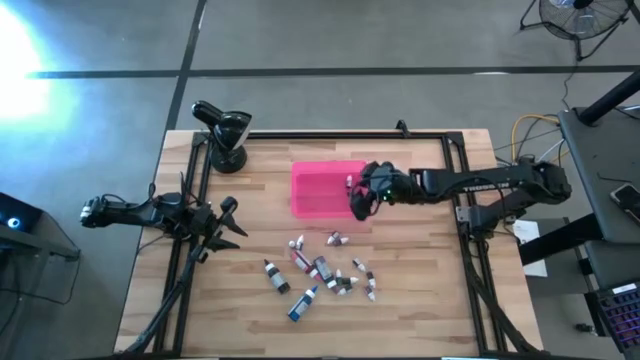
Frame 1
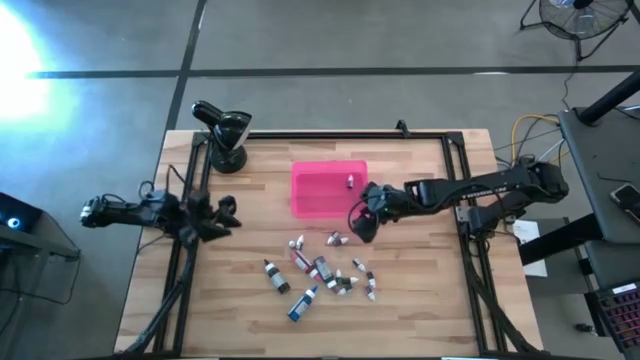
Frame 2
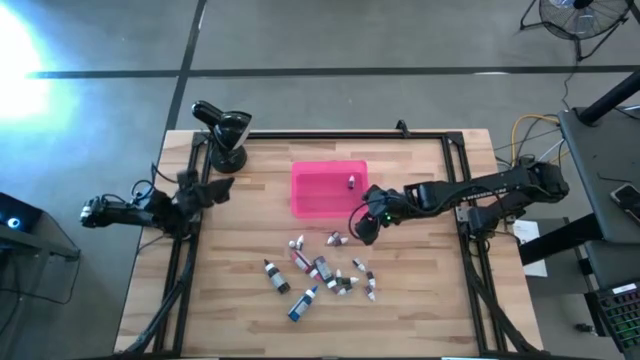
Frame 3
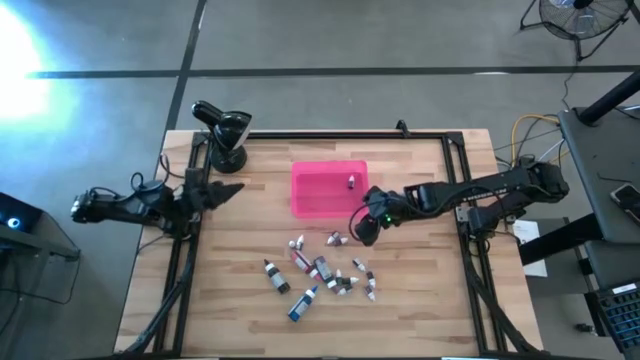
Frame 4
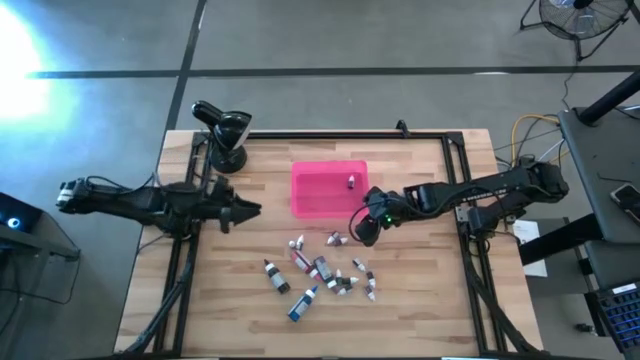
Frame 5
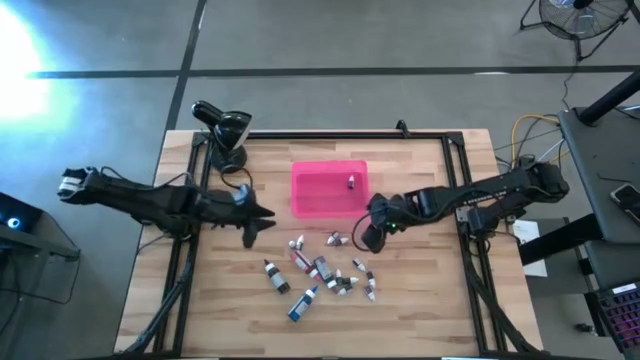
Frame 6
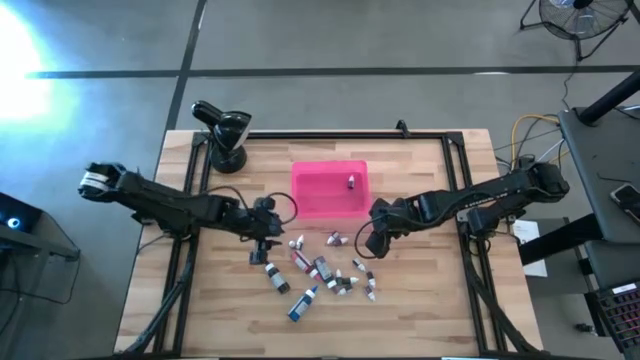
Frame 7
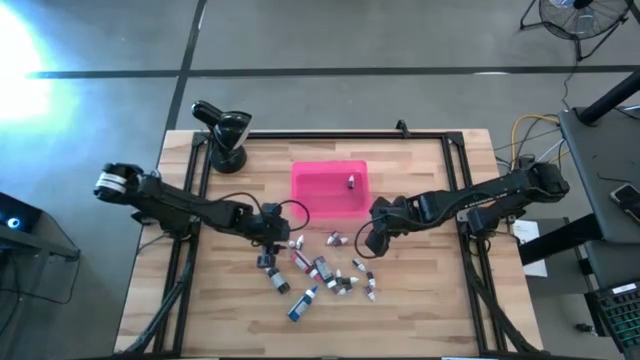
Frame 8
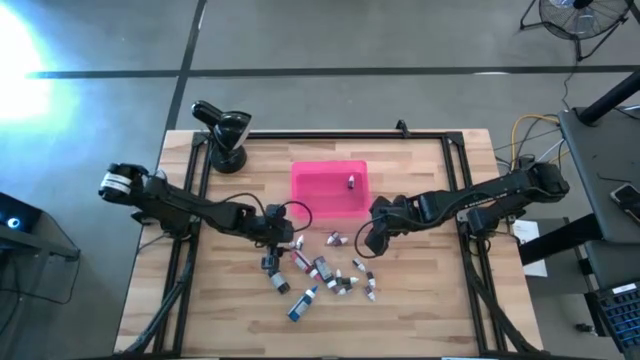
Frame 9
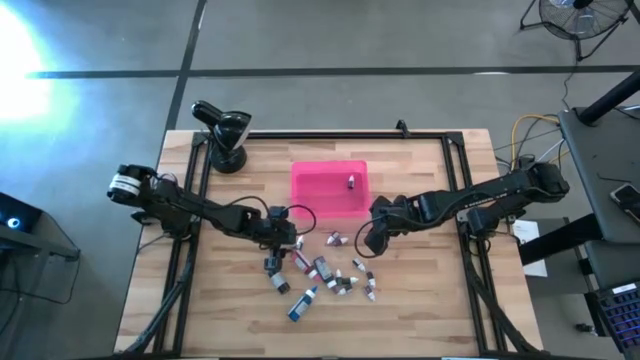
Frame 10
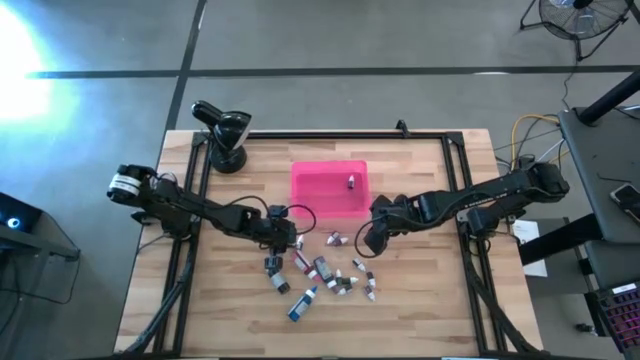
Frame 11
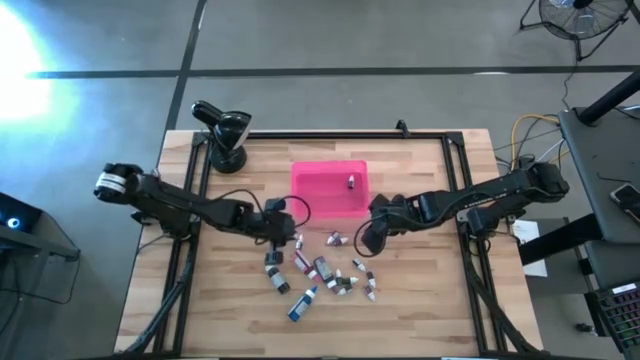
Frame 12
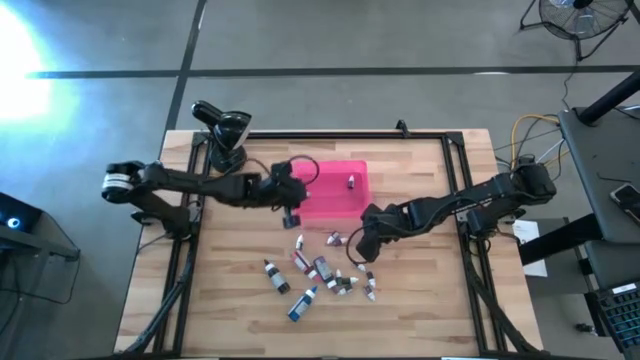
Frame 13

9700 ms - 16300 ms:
Task: Pick & Place food coloring
Put the red food coloring bottle into the pink bin

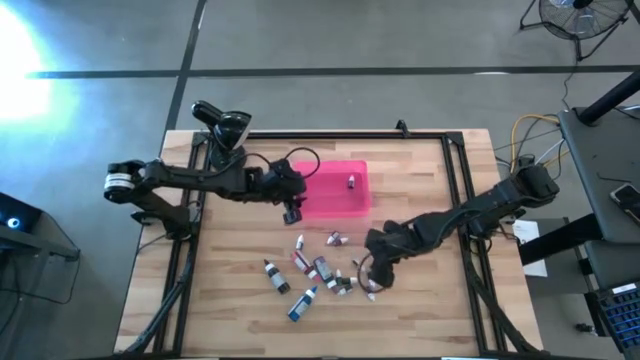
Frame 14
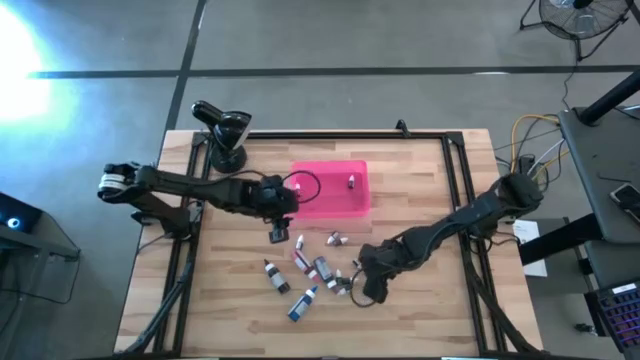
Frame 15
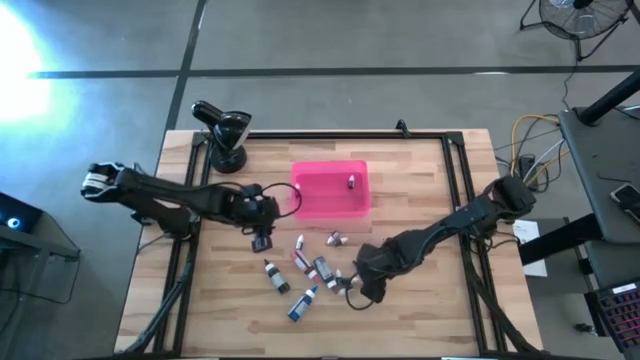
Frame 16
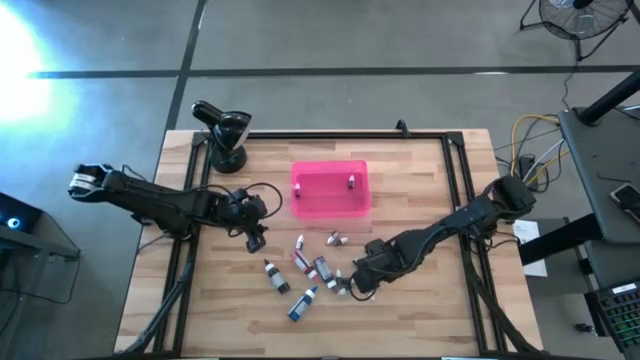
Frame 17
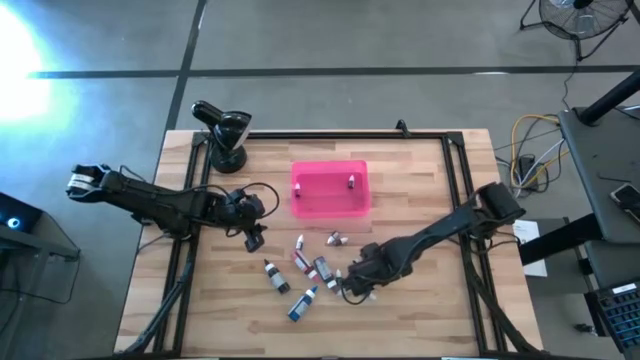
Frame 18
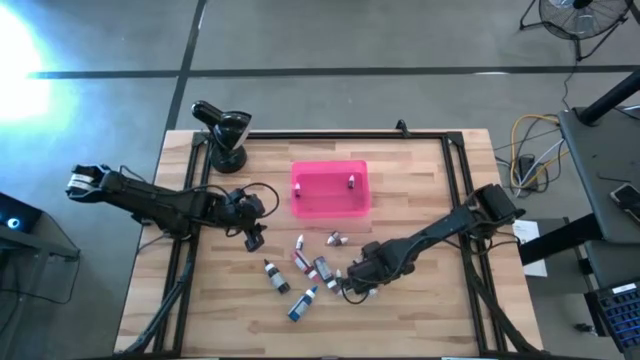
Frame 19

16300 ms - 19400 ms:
Put the green food coloring bottle into the pink bin

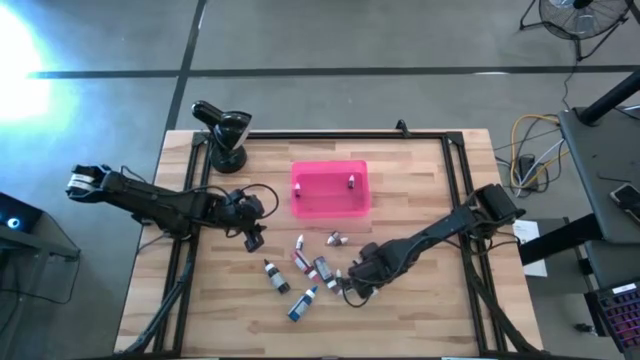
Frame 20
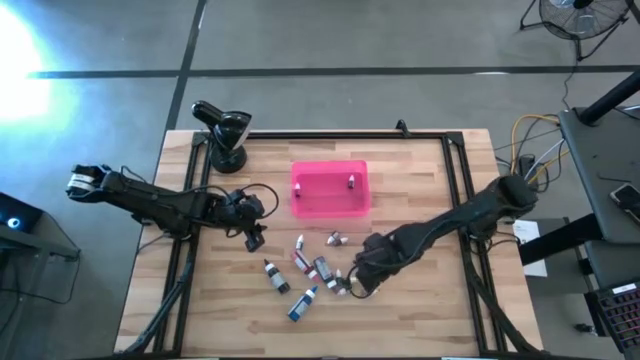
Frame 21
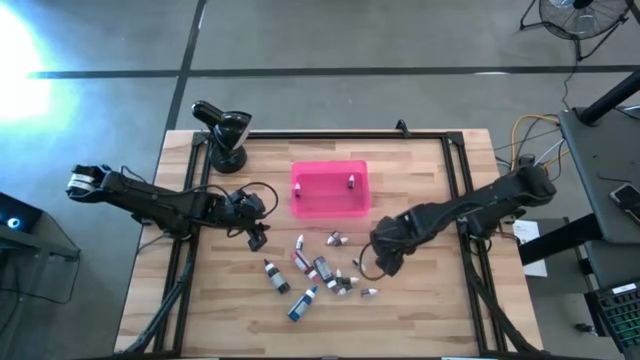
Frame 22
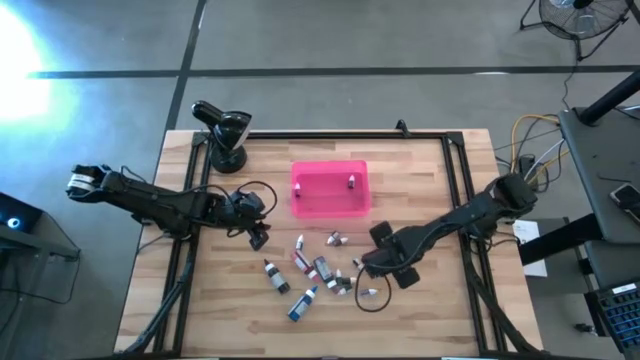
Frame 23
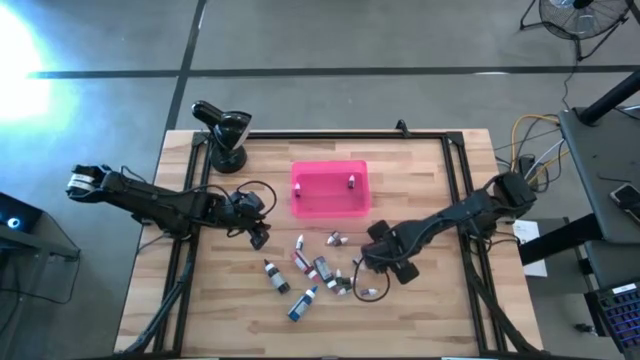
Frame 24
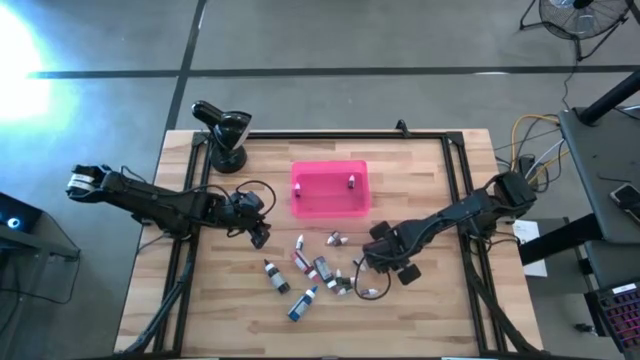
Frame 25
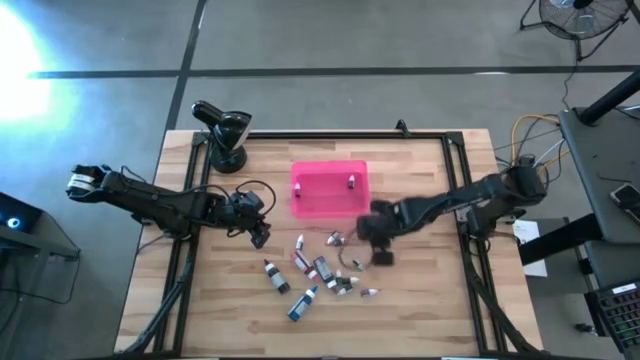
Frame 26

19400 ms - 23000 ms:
Put the green food coloring bottle into the pink bin

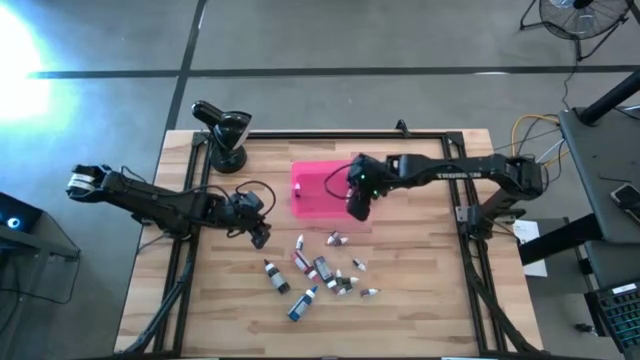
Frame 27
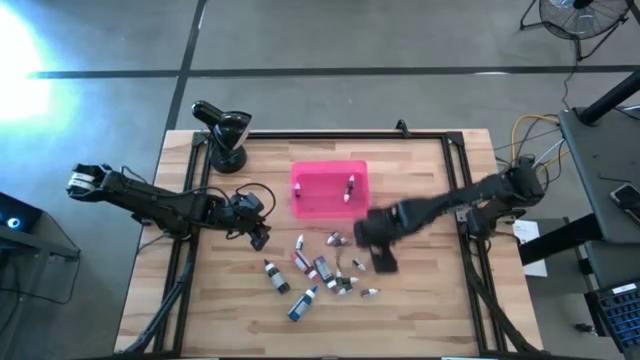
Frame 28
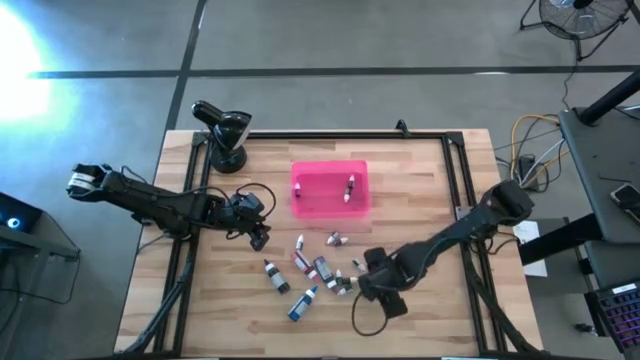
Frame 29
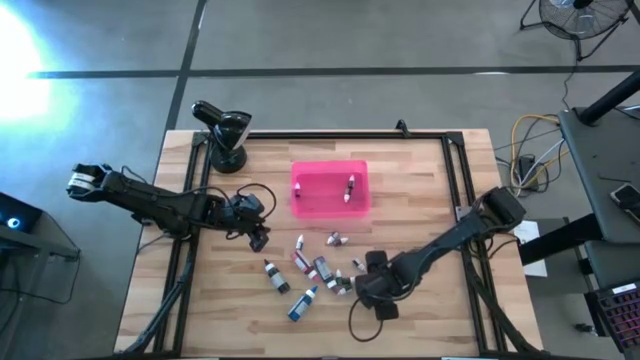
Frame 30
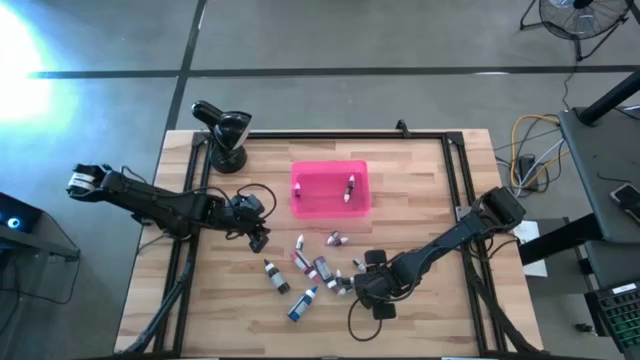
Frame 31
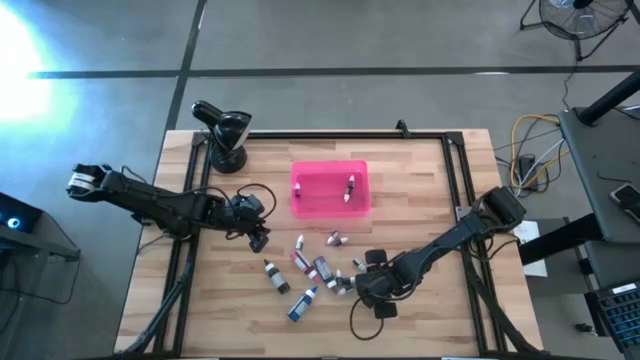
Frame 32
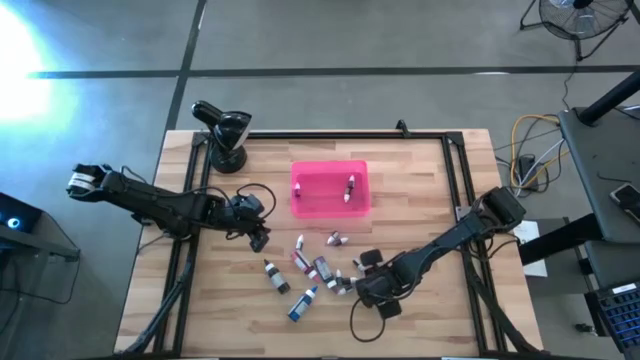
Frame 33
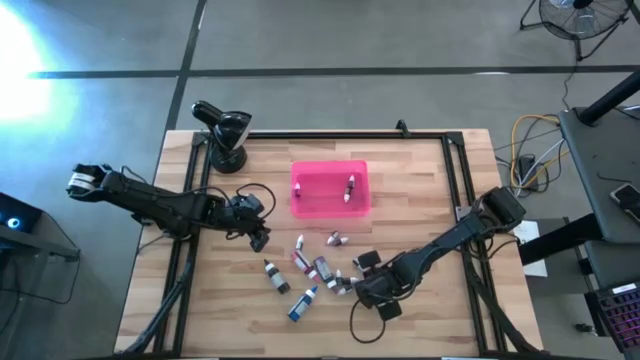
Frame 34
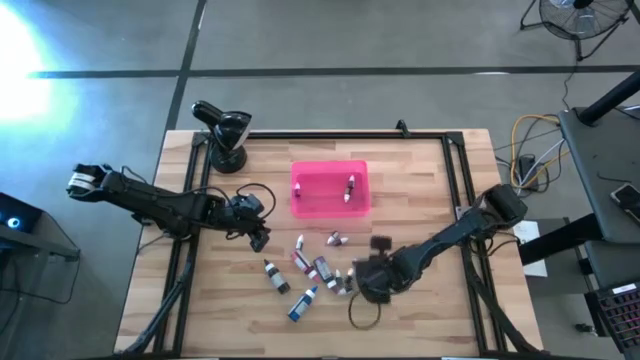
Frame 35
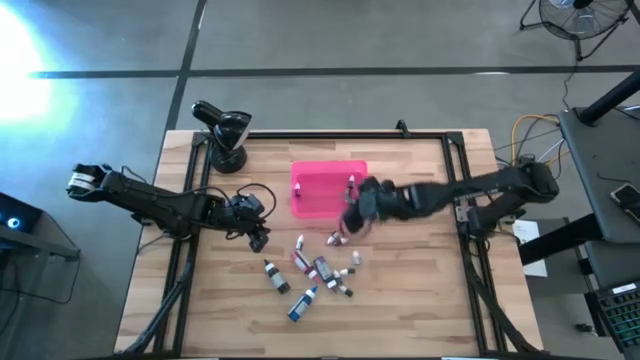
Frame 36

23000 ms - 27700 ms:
Put the purple food coloring bottle into the pink bin

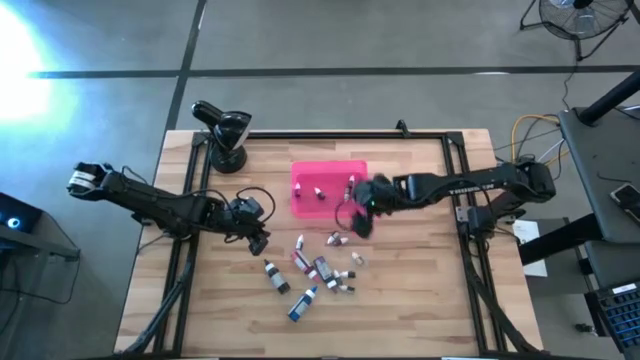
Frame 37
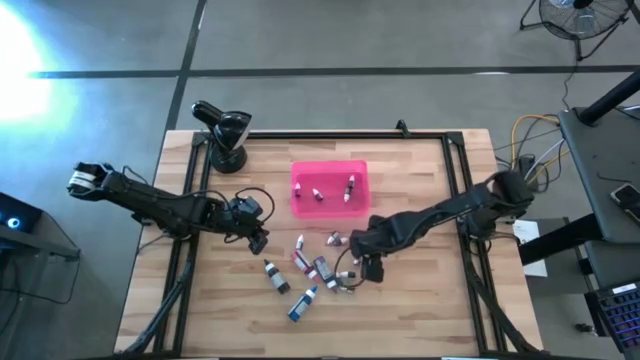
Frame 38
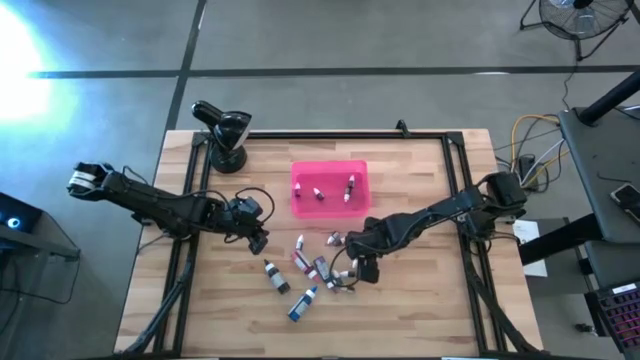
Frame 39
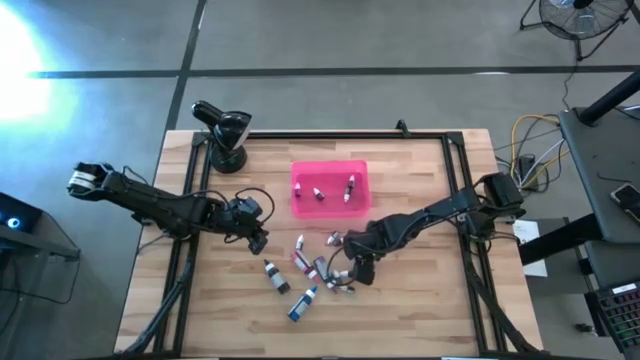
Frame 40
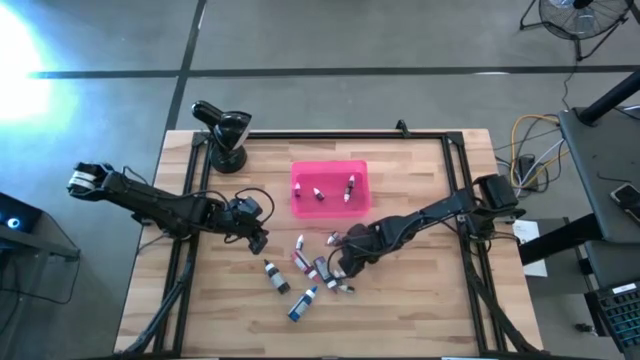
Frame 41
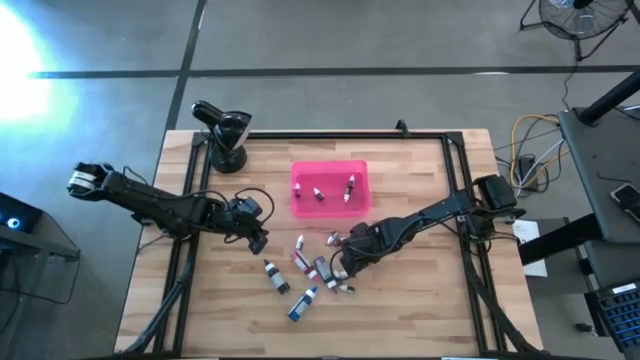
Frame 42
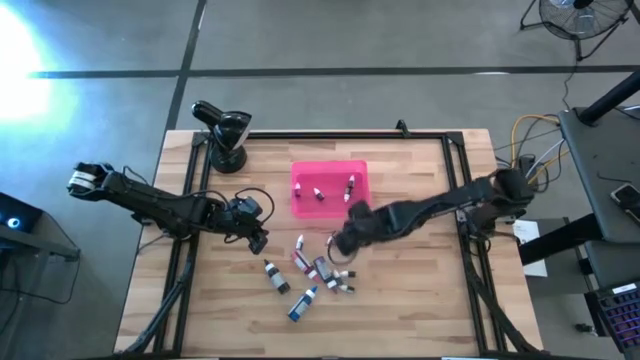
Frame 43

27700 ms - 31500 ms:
Put the red food coloring bottle into the pink bin
